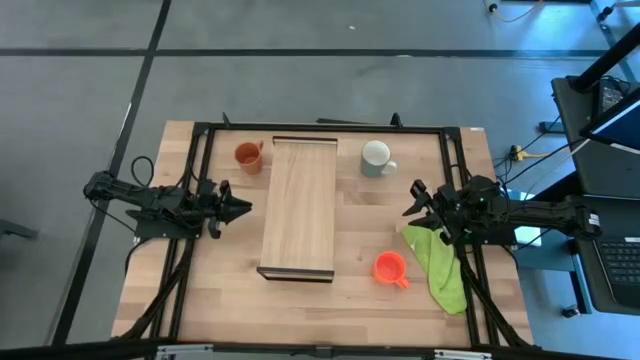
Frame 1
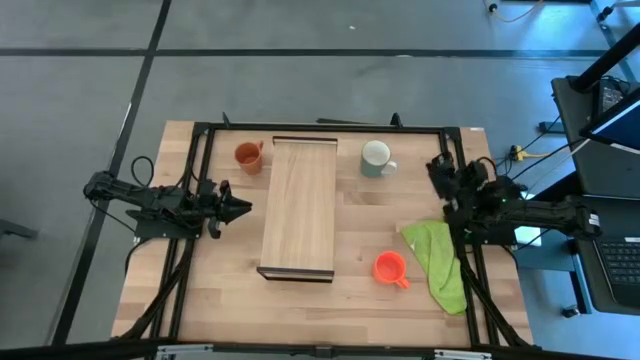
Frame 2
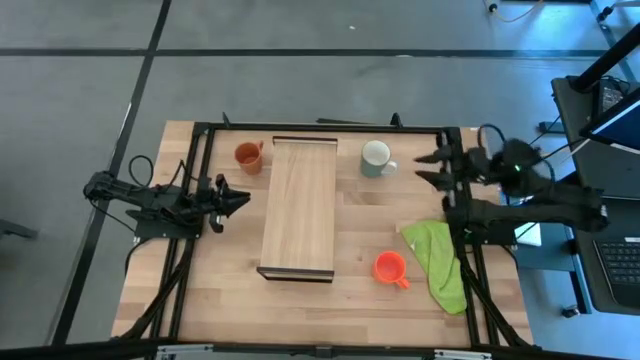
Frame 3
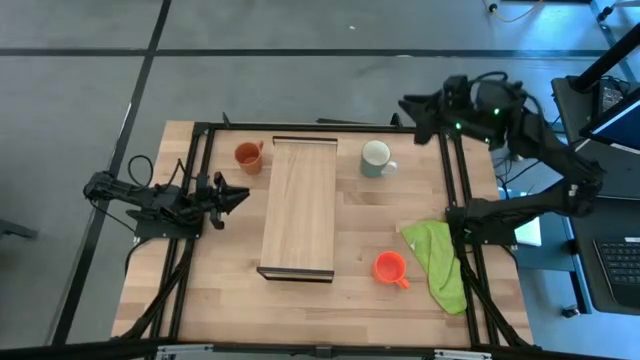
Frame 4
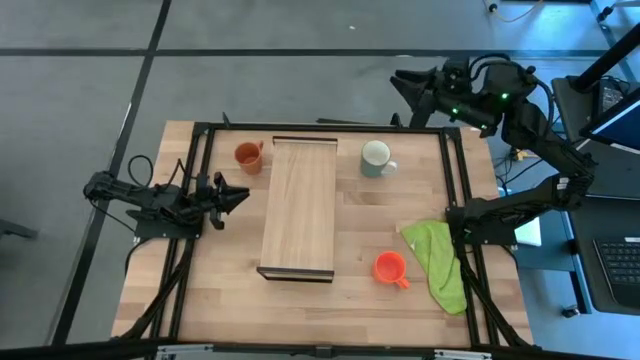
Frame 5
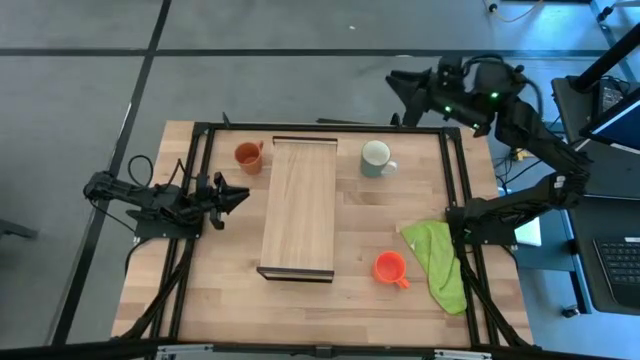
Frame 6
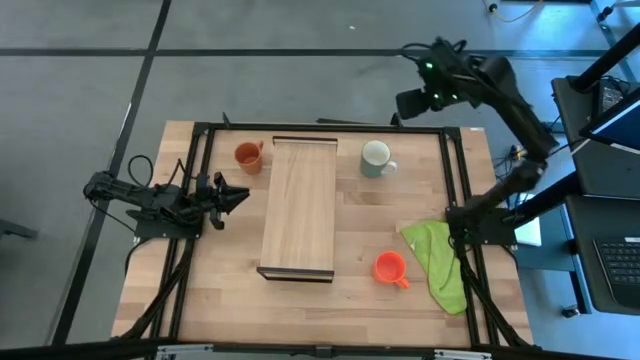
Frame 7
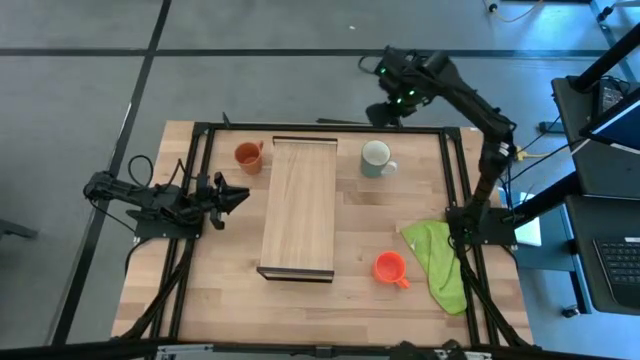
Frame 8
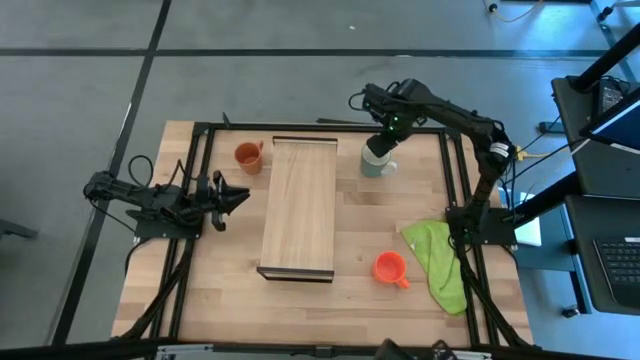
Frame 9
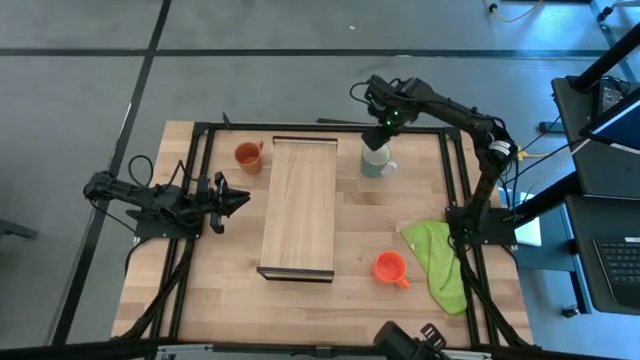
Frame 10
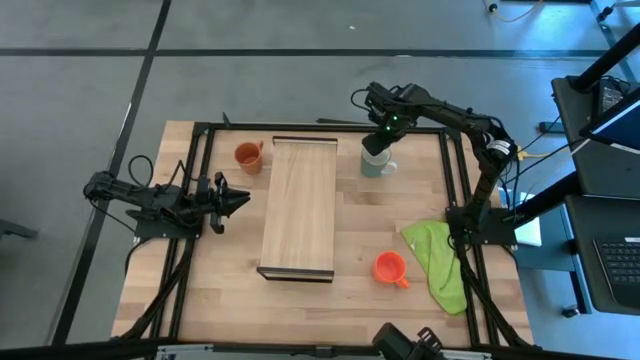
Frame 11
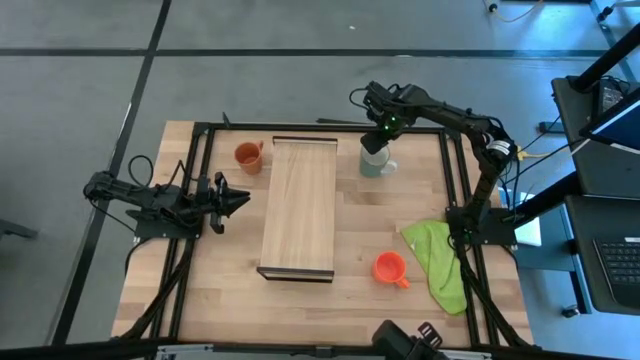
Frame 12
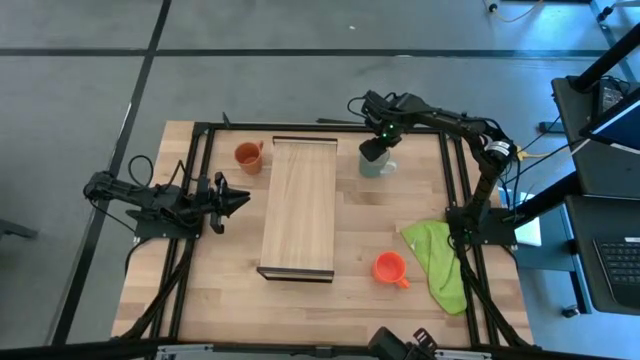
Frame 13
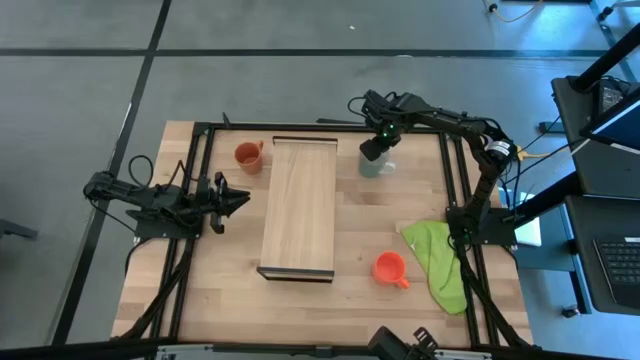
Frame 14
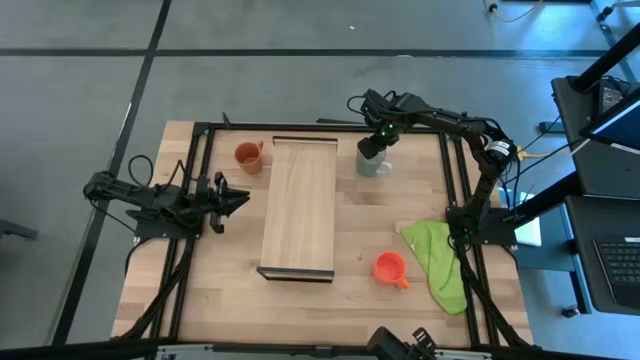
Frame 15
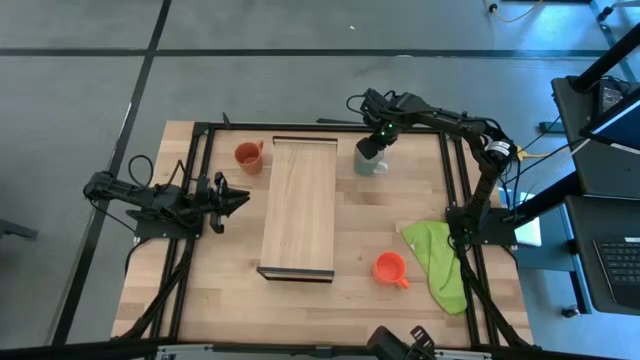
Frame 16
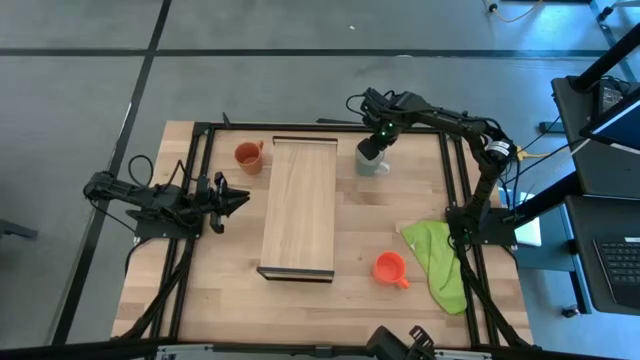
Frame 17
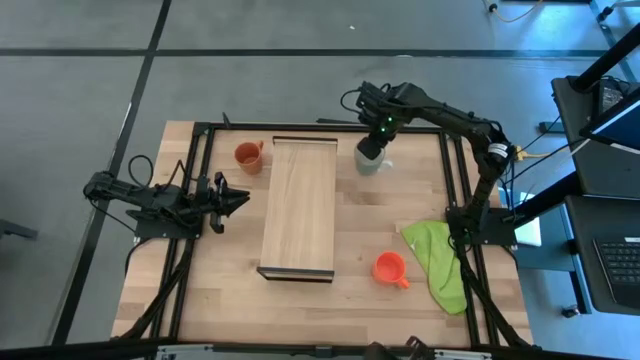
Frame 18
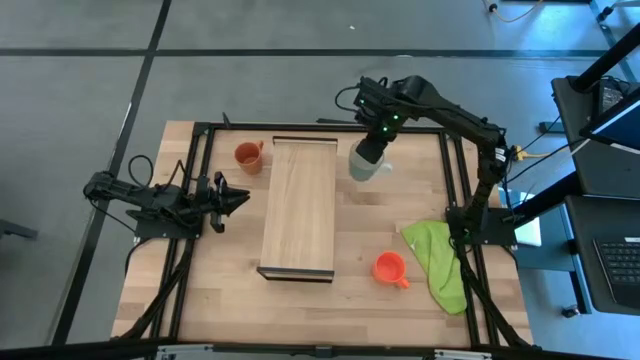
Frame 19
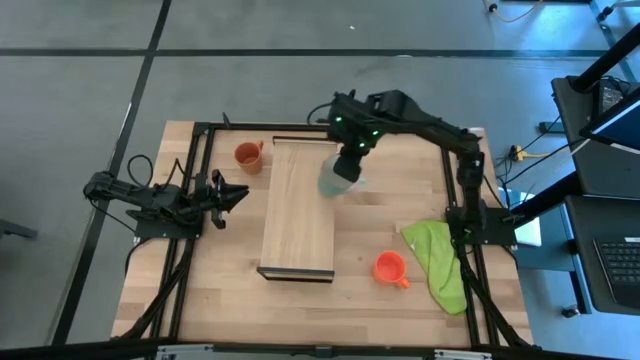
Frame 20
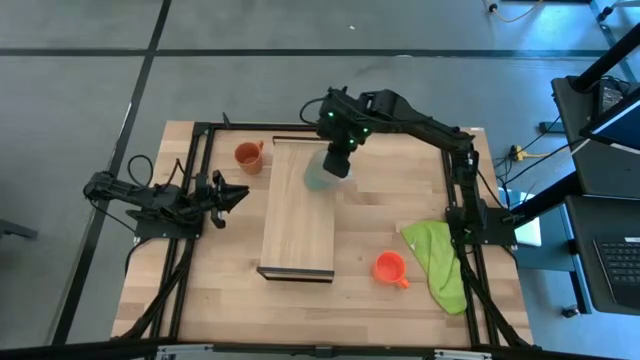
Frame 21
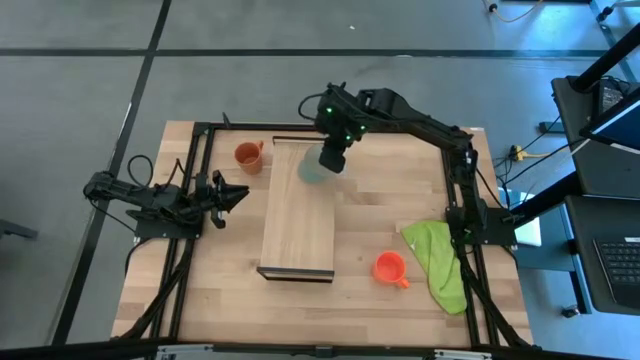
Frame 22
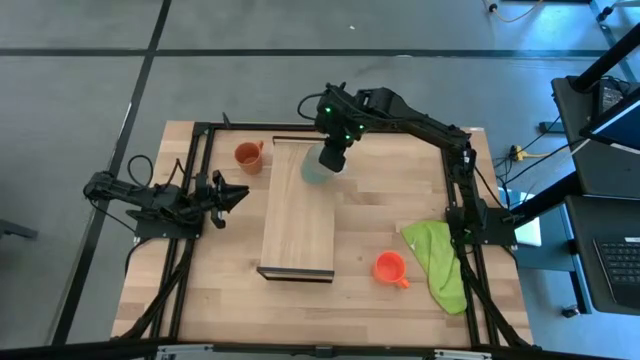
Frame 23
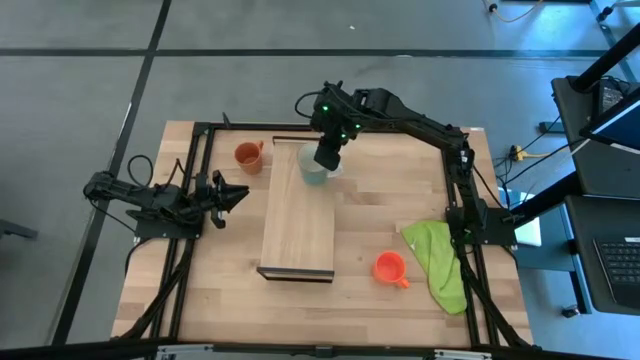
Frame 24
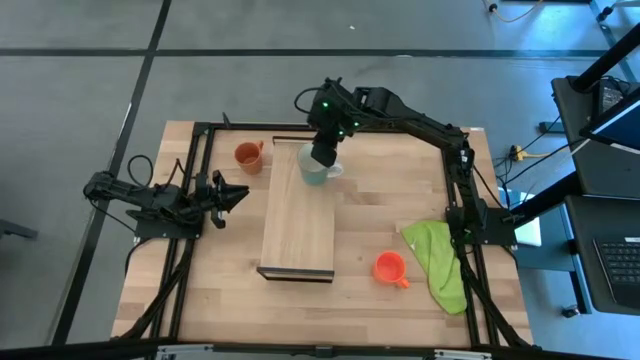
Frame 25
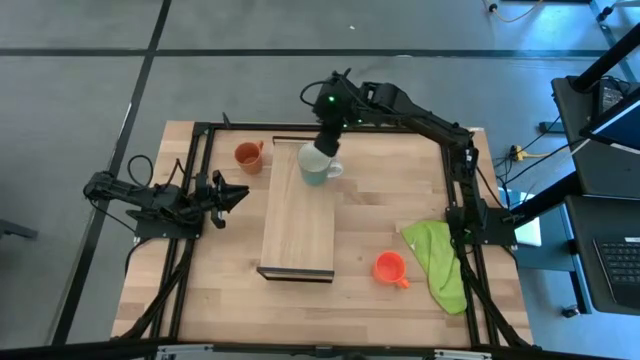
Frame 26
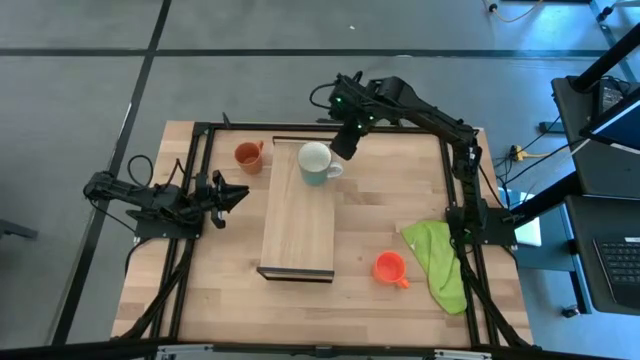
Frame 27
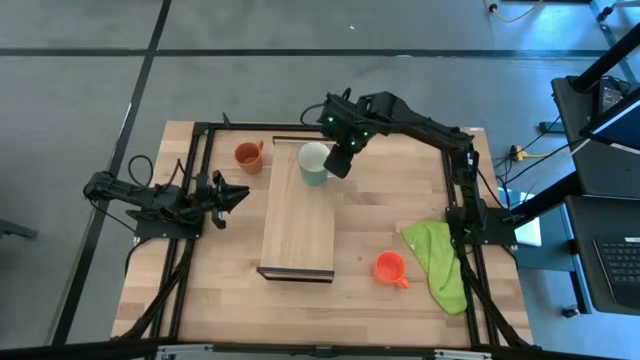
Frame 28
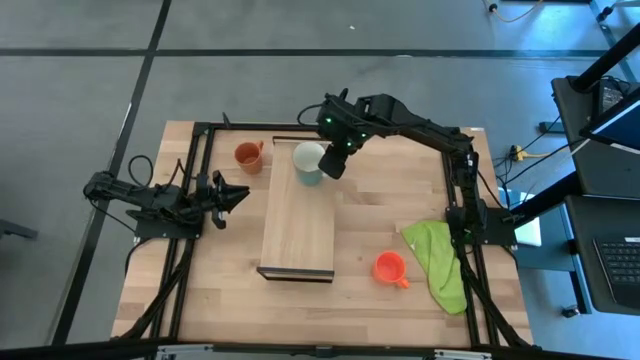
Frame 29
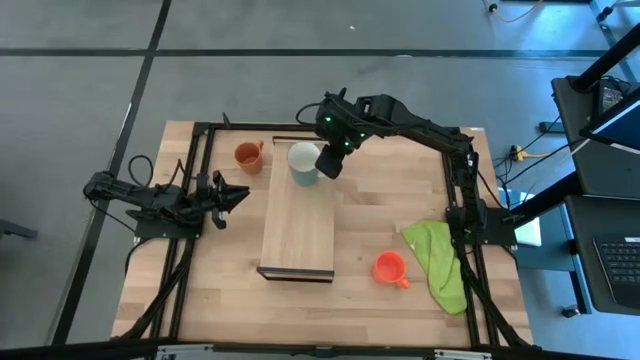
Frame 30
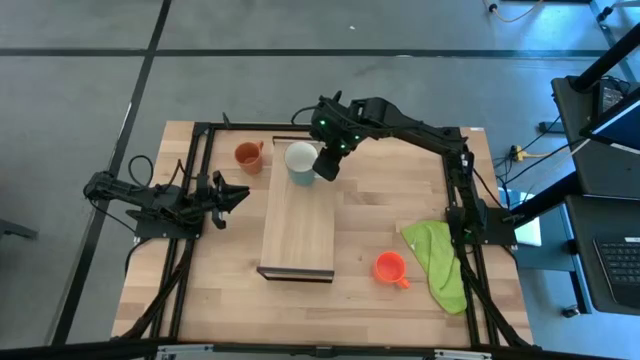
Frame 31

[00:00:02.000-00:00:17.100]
Task: Stack small to large cups/mugs on shelf
Put the blue mug on the shelf
